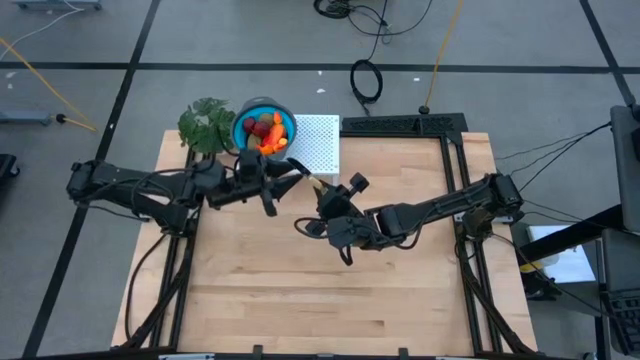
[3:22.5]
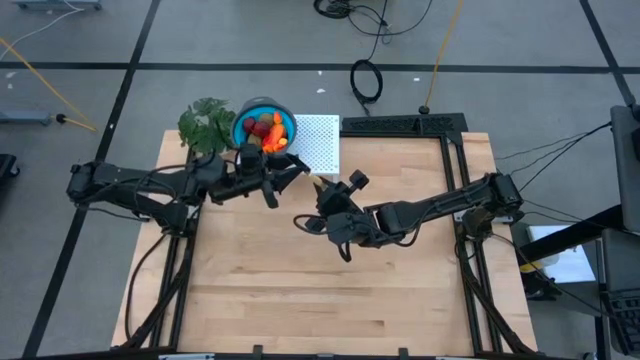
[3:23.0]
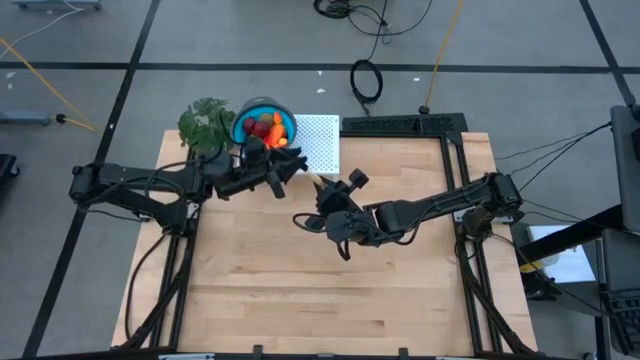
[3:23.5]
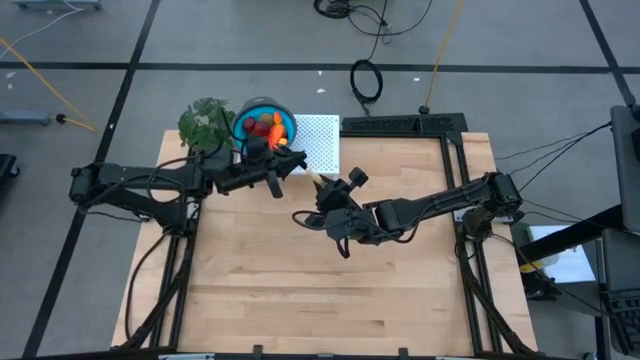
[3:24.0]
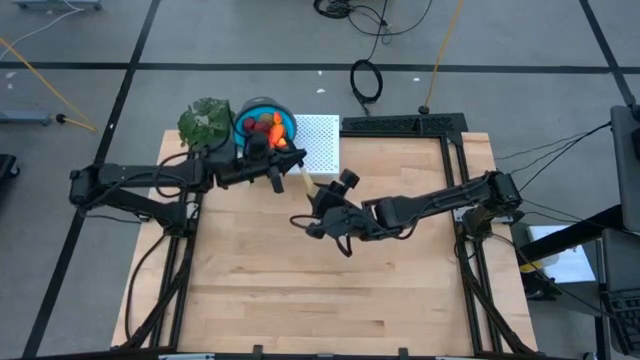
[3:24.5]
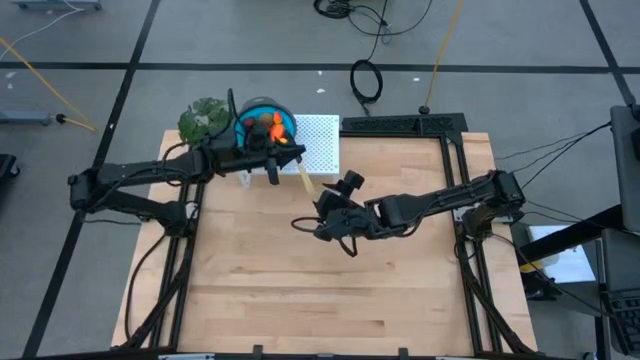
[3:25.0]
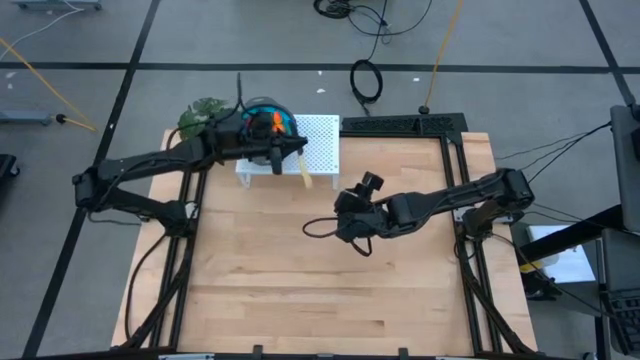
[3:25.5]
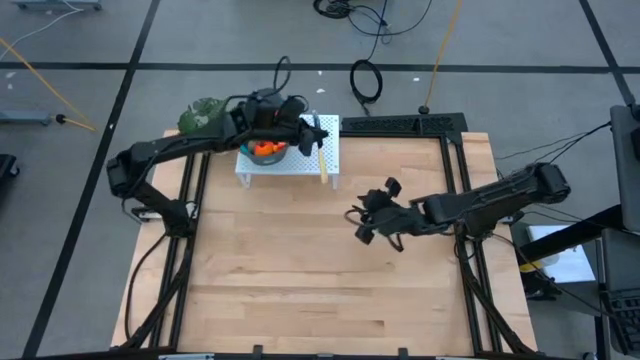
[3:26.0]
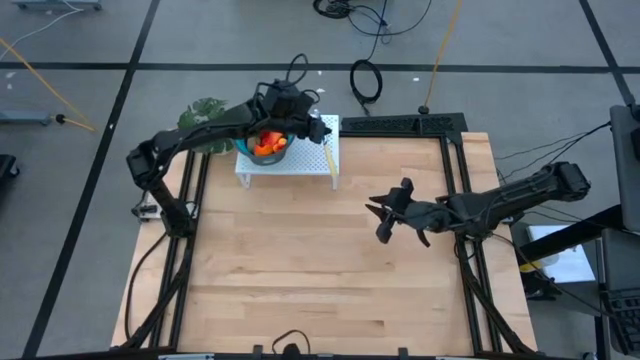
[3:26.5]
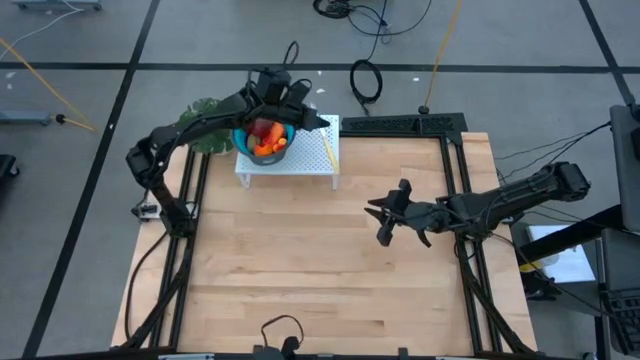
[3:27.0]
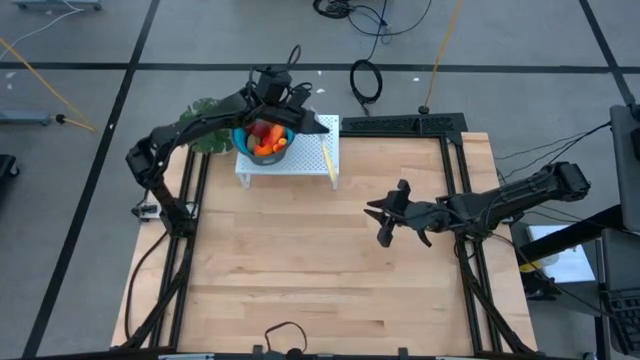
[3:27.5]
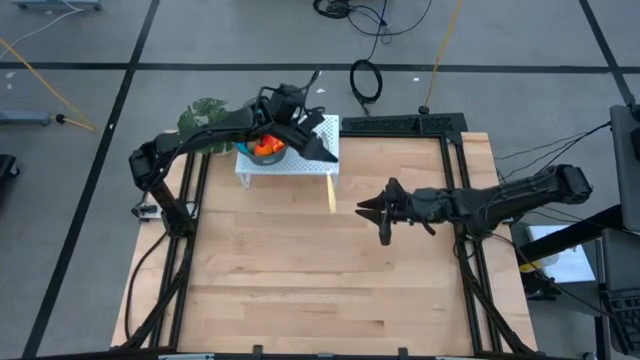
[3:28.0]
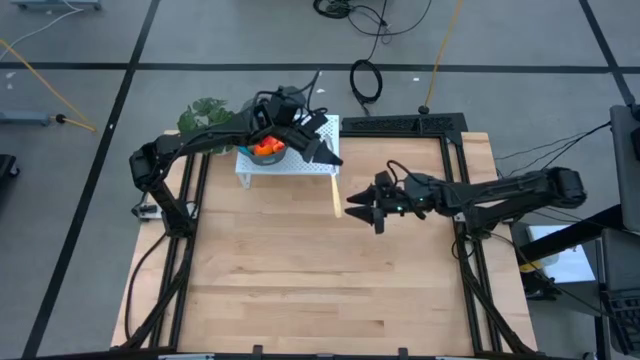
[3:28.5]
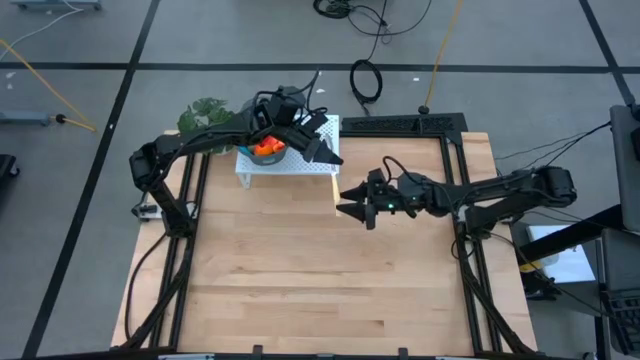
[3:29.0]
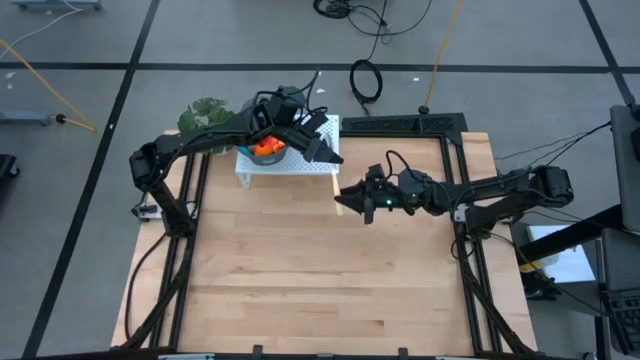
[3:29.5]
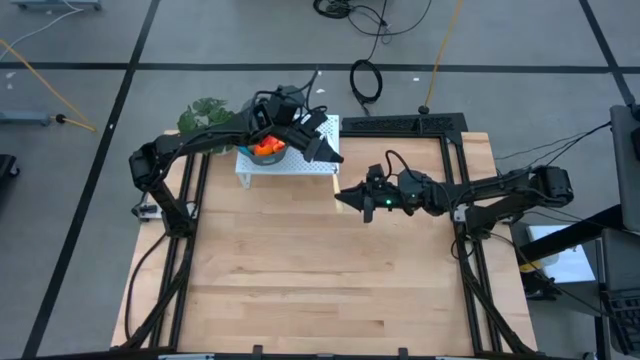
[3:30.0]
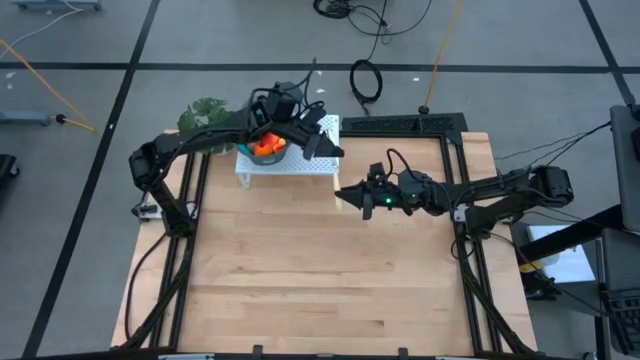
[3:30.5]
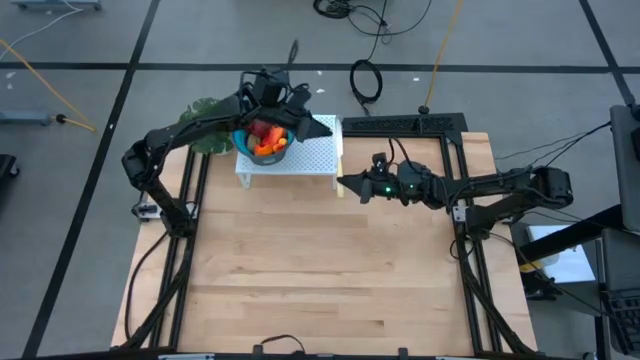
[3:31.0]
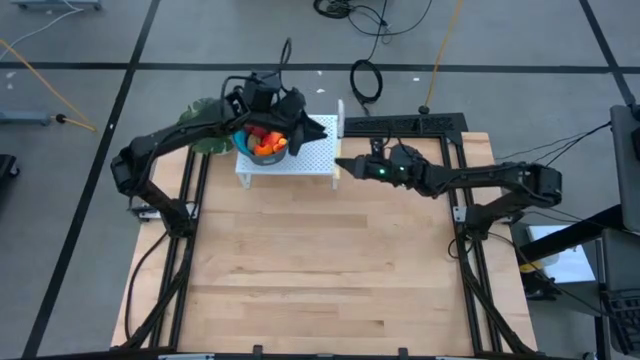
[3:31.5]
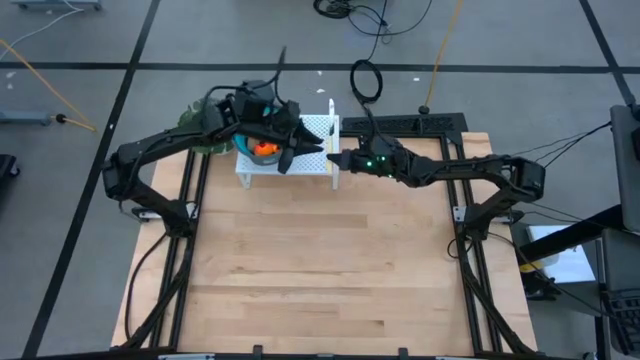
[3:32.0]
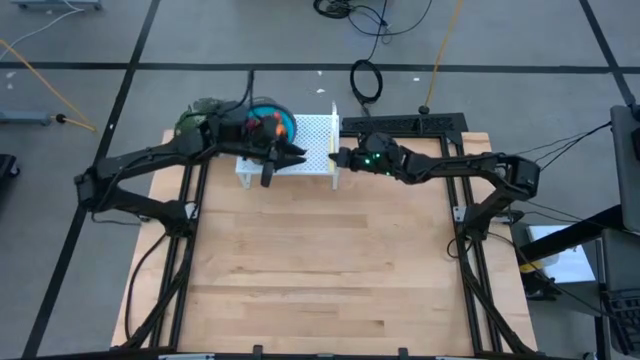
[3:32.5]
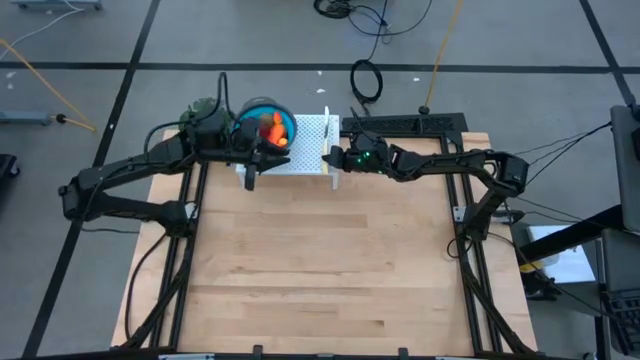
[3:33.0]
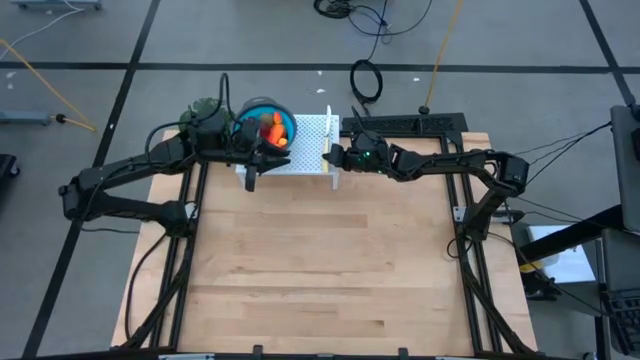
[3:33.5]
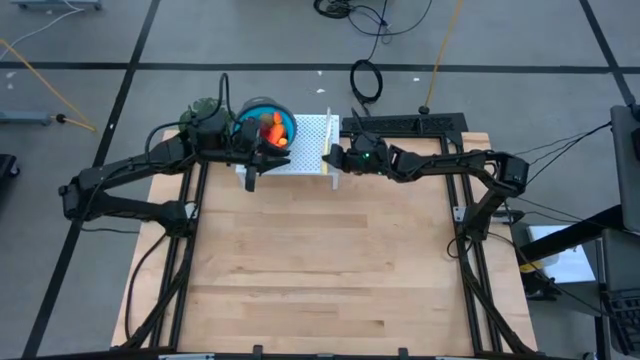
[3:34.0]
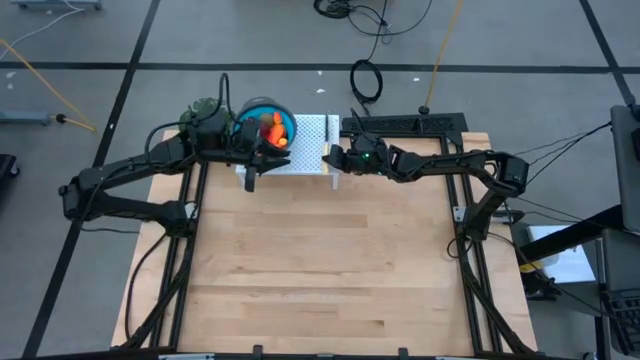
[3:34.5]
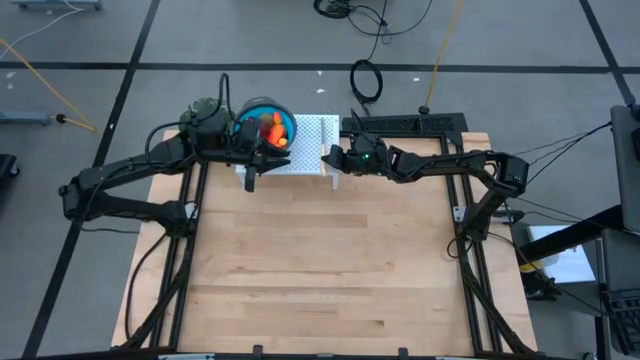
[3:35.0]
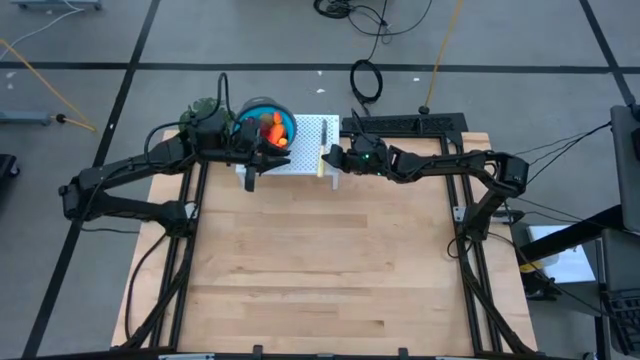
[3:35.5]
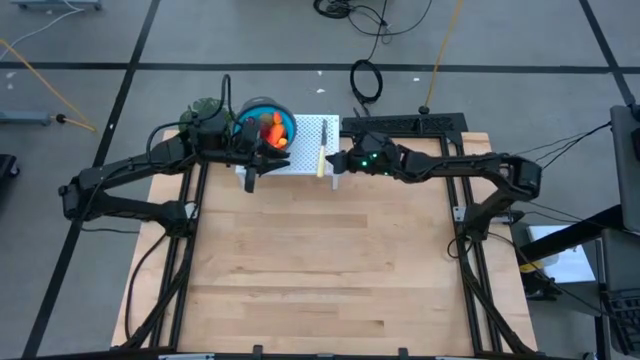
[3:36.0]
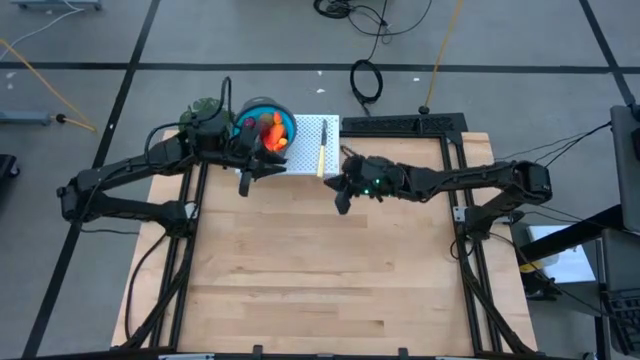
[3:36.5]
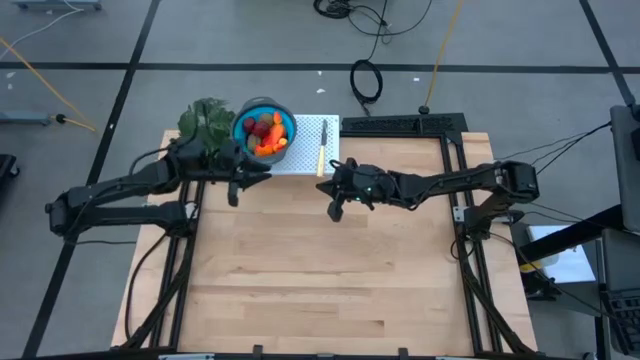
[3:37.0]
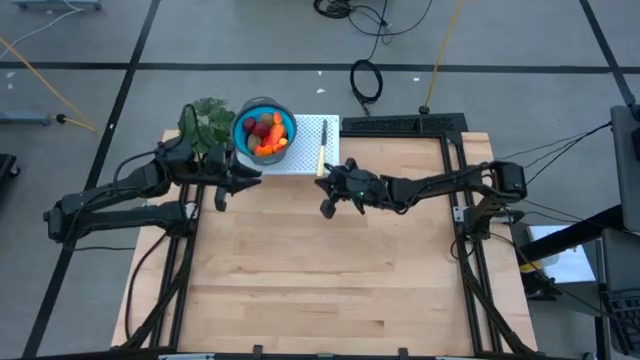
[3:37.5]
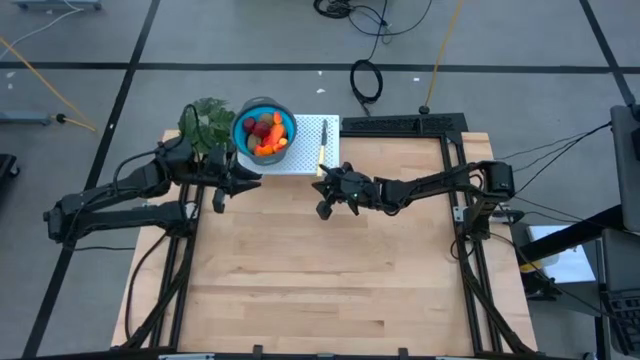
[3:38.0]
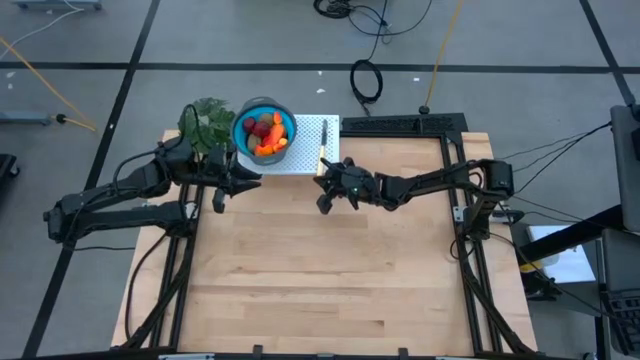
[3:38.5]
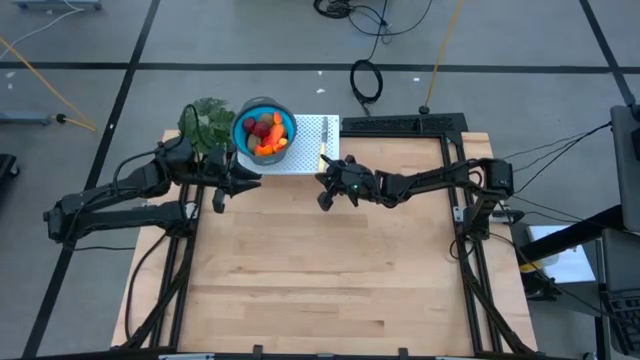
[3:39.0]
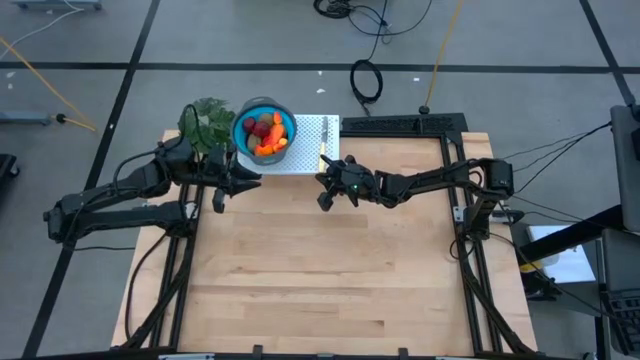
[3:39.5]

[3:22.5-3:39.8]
Task: Pick & Place Fruit
Put the yellow table knife on the shelf

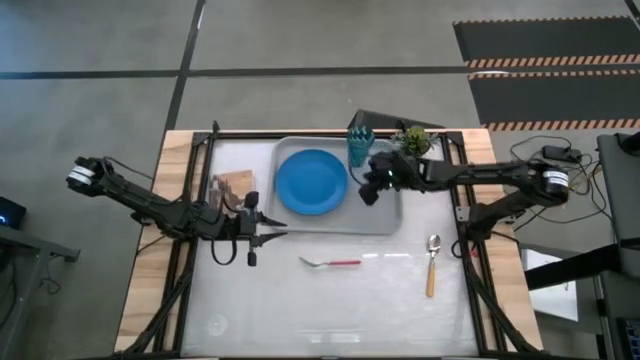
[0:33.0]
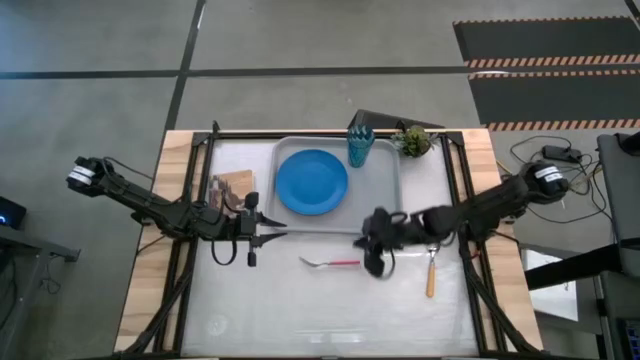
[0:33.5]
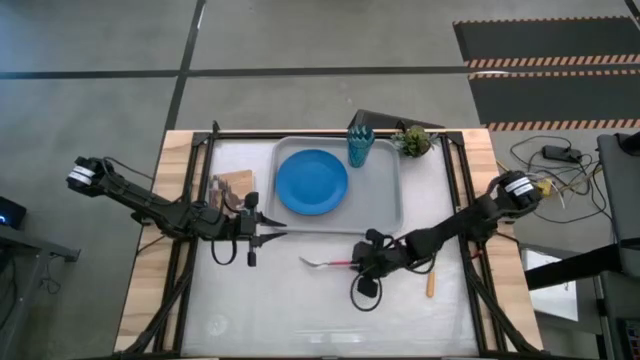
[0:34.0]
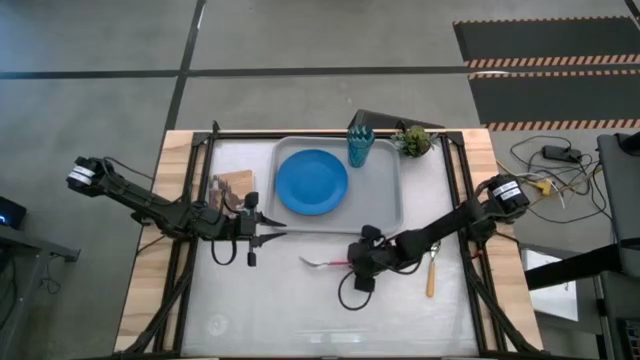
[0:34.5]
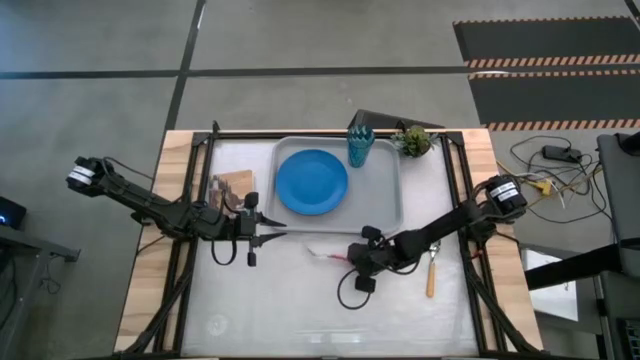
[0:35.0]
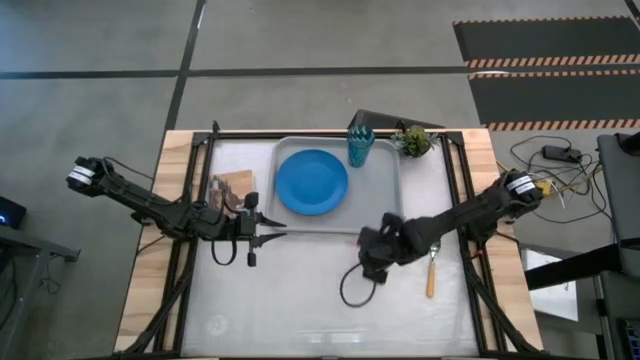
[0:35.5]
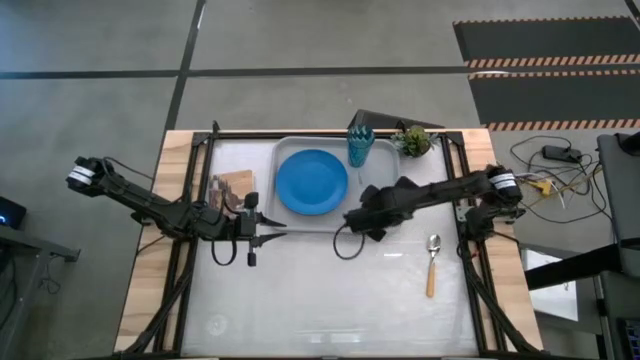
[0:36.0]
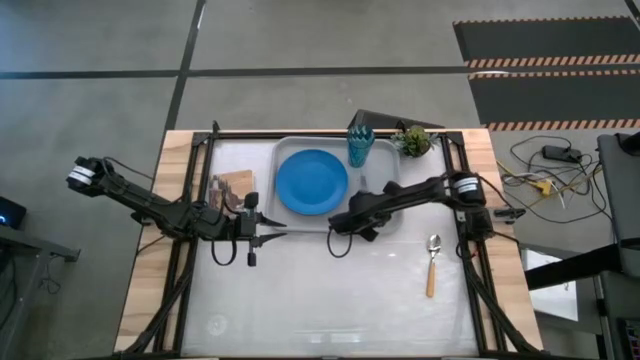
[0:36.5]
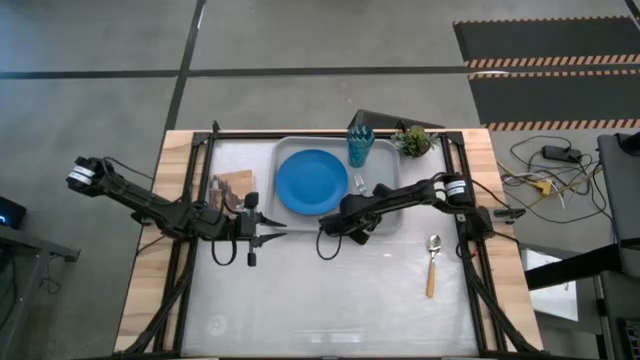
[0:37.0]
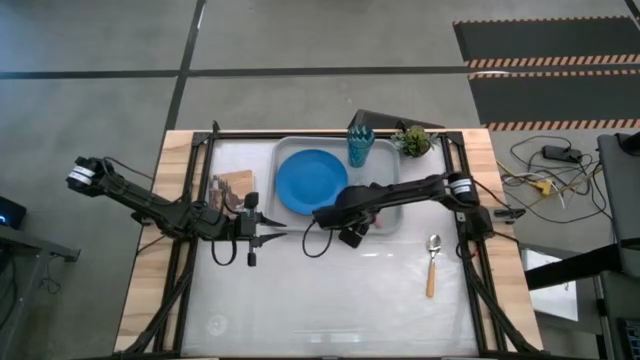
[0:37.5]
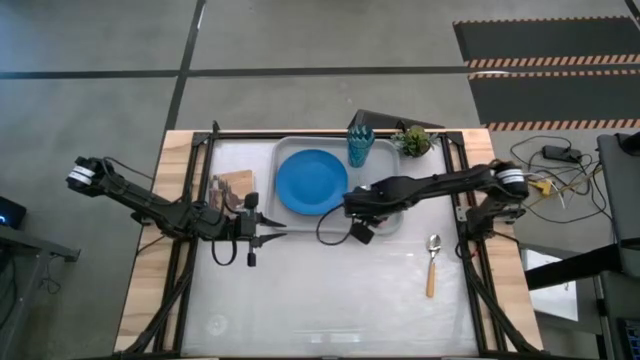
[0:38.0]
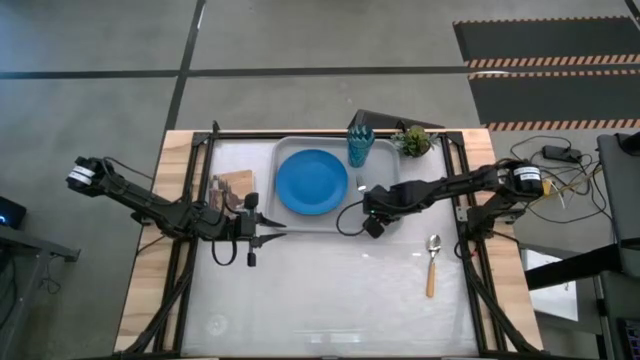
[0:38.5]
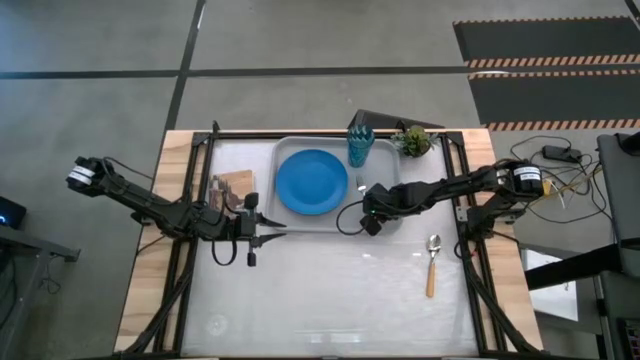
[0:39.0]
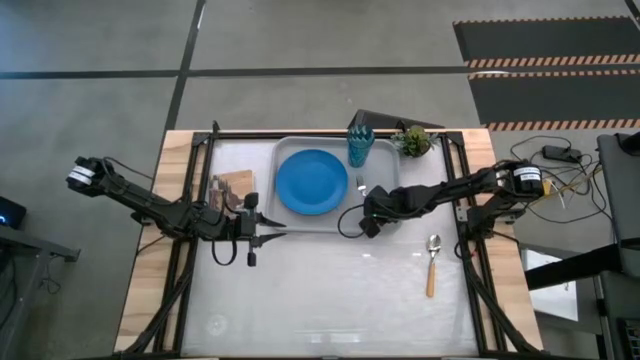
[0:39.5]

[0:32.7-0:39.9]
Task: Pick and place plate/cup/fork/spoon on tray
Put the red fork beside the blue plate on the gray tray
